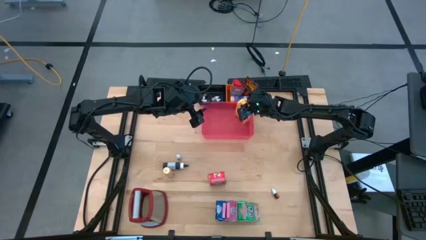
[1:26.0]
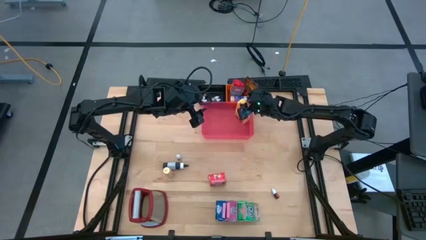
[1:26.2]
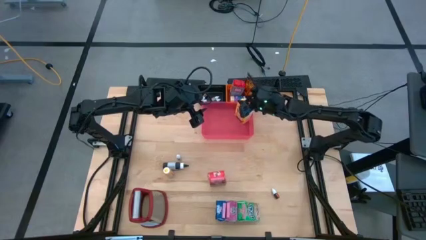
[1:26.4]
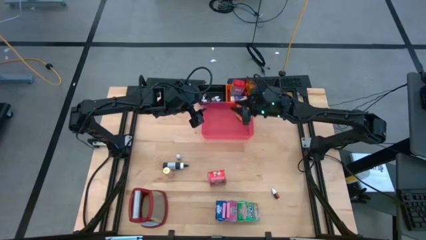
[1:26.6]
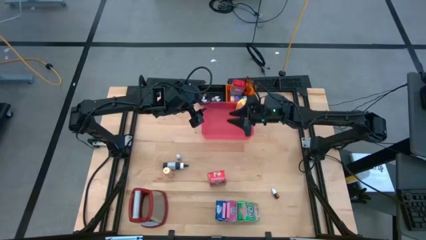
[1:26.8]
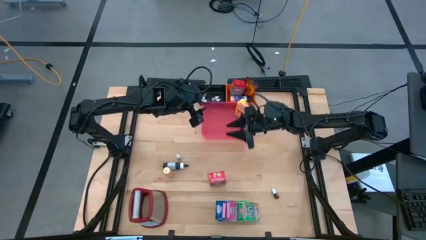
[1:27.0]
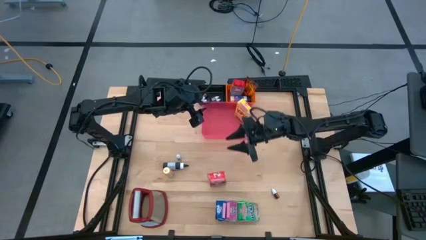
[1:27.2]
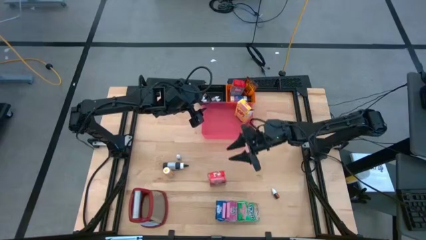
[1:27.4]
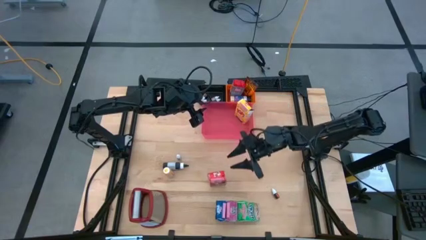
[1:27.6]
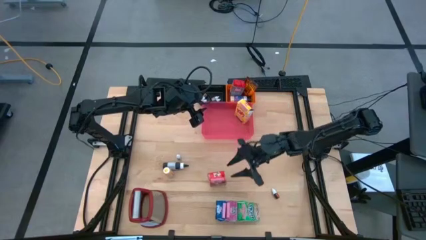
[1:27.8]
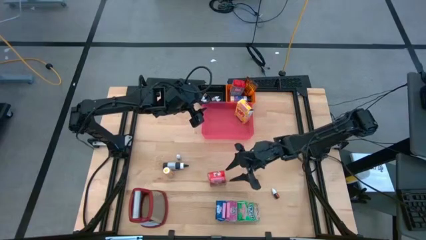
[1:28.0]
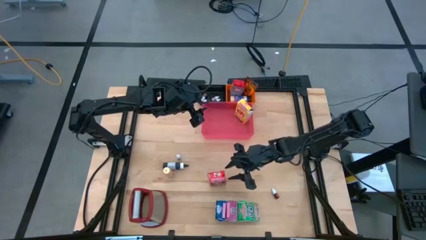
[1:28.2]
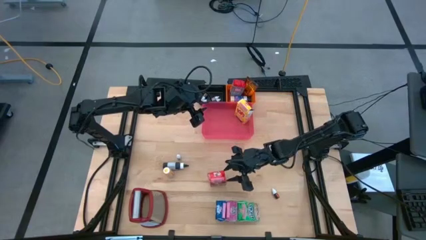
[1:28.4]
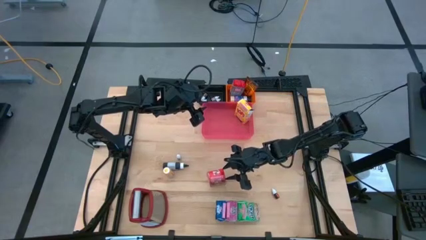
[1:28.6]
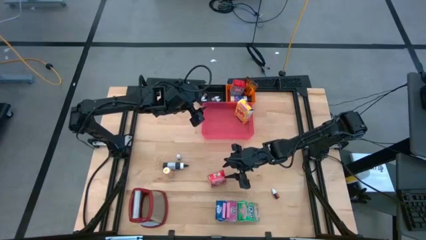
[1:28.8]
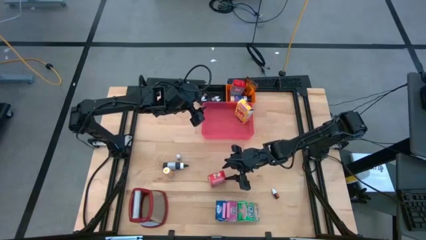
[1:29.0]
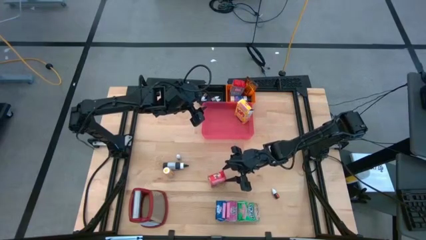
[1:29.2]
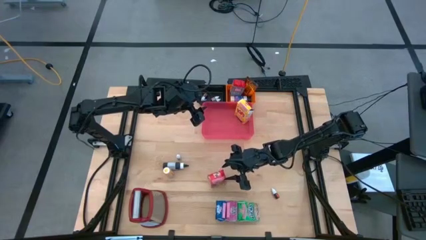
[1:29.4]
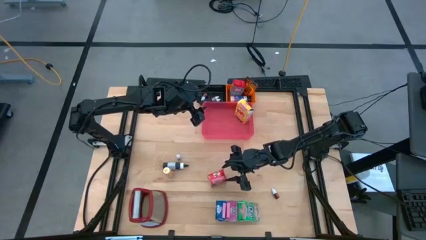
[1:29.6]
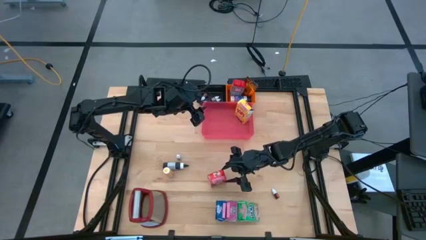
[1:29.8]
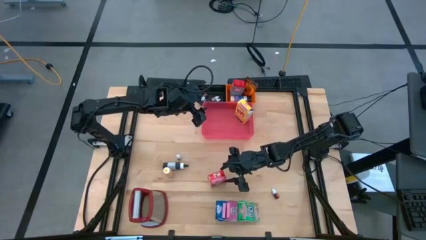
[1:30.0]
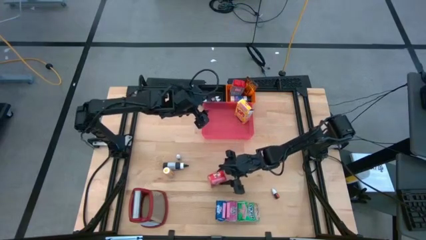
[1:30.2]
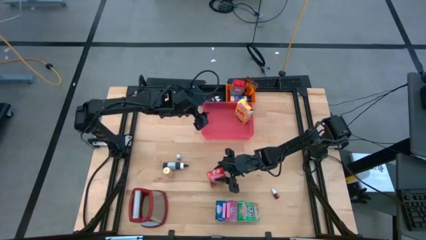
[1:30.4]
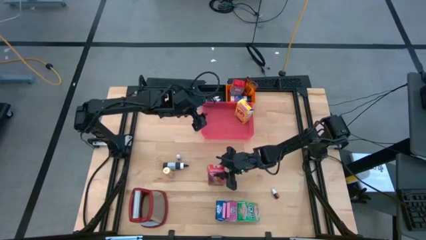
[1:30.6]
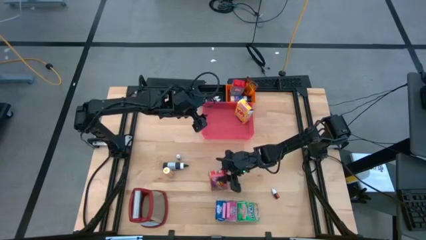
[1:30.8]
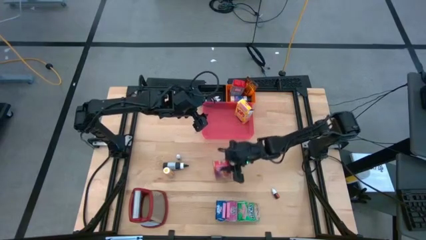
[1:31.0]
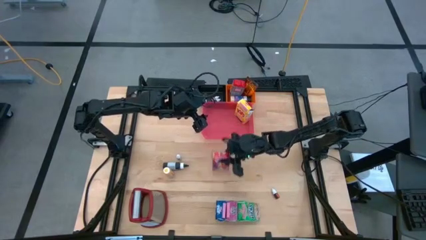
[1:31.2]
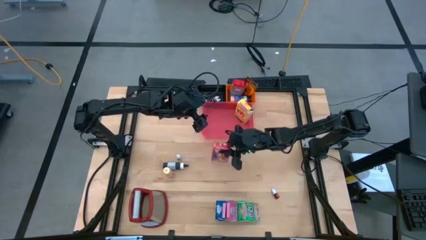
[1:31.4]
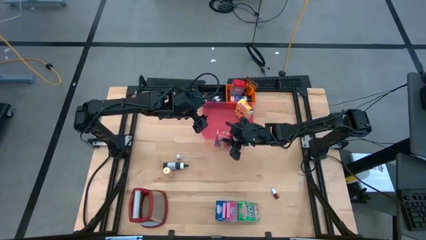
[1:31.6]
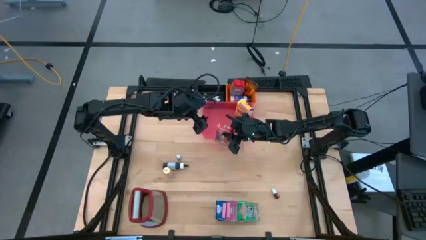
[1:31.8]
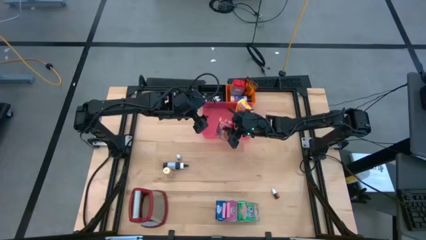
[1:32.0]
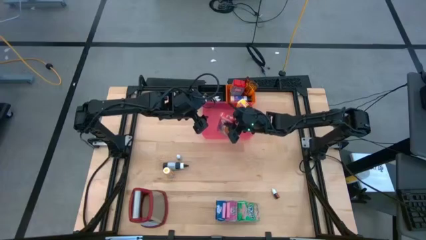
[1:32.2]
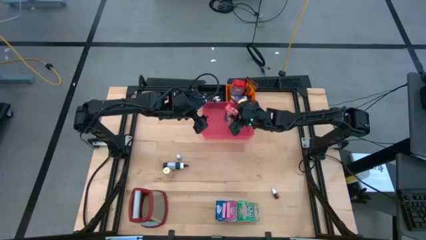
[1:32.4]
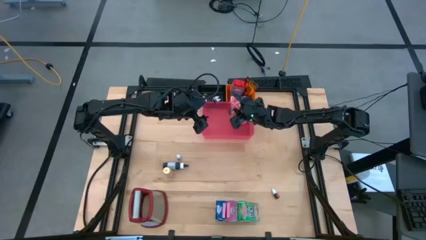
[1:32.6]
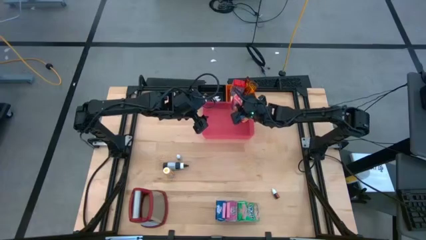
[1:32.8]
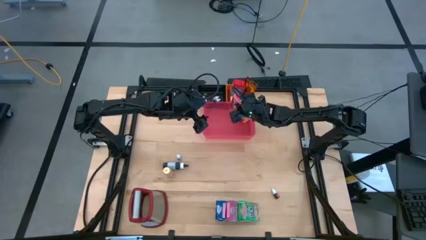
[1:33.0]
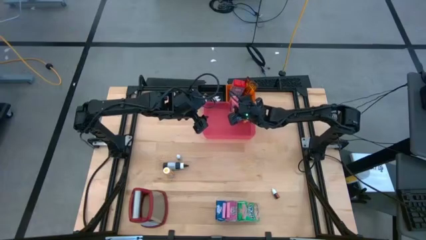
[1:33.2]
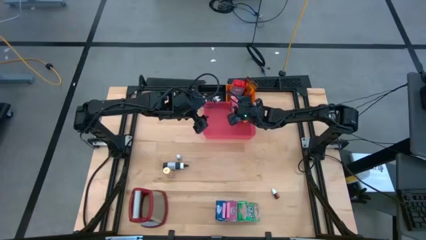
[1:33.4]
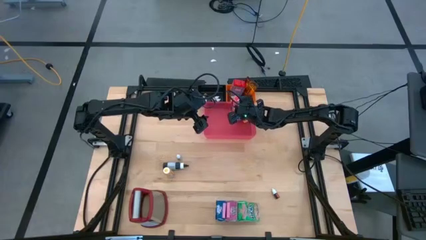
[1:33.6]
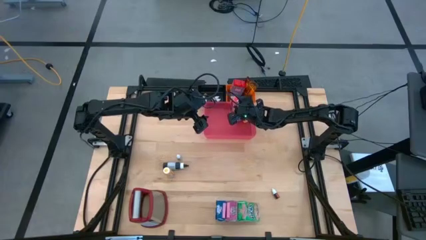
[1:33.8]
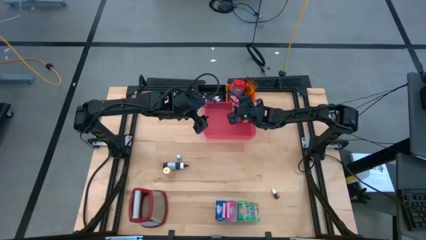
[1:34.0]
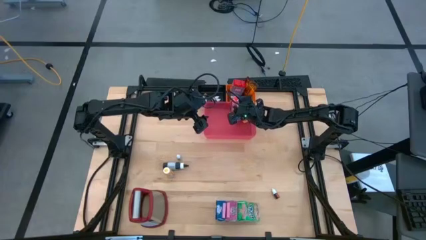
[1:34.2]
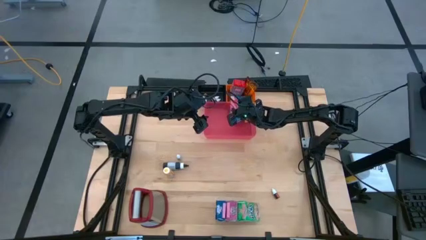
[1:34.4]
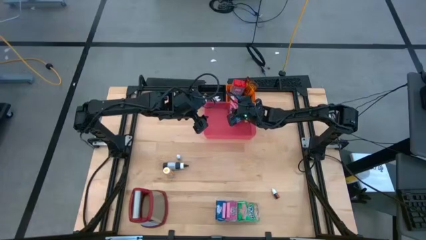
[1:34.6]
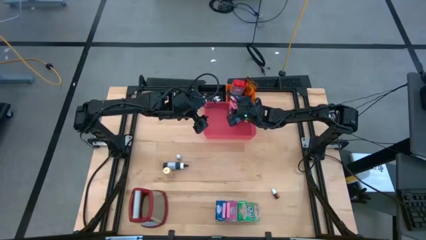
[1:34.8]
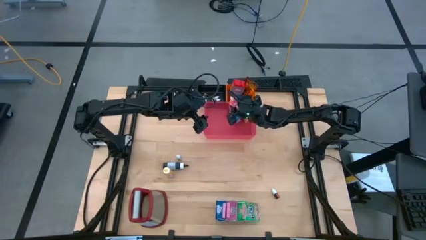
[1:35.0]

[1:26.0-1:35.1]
Task: Pick & Place Kitchen Items
Put the red cereal box into the pink bin

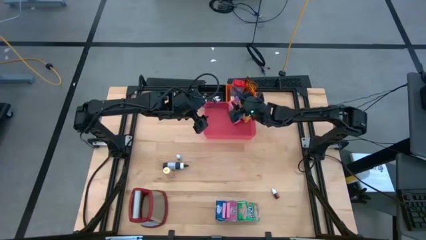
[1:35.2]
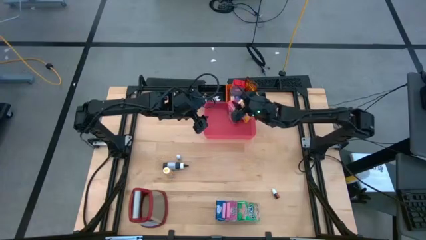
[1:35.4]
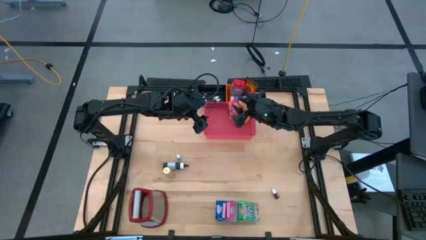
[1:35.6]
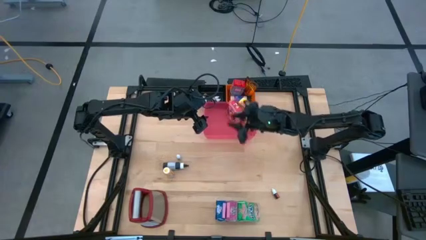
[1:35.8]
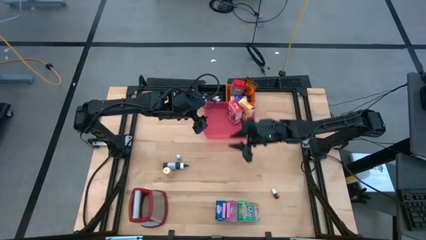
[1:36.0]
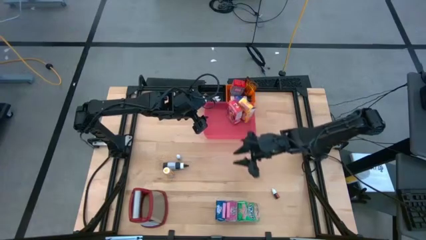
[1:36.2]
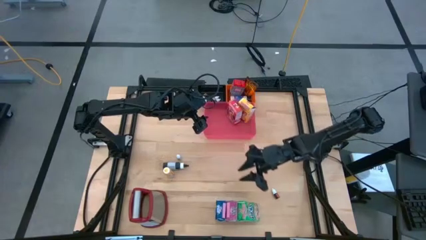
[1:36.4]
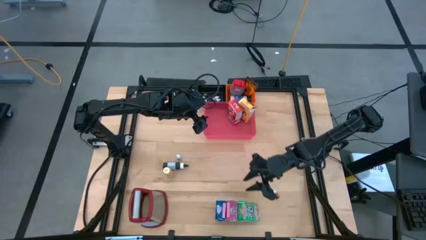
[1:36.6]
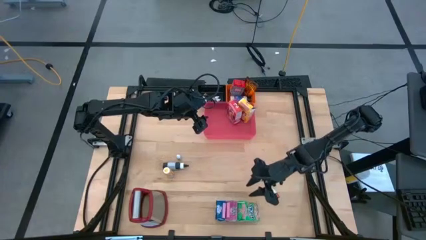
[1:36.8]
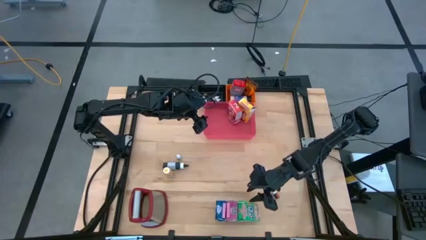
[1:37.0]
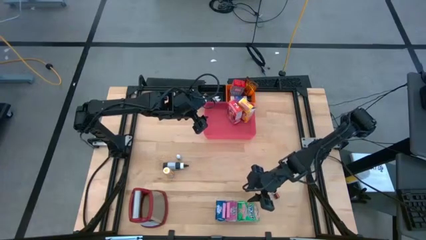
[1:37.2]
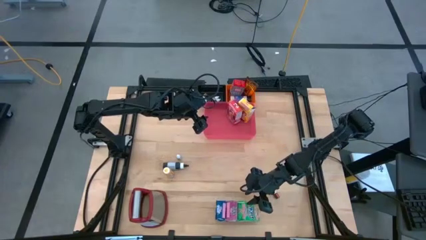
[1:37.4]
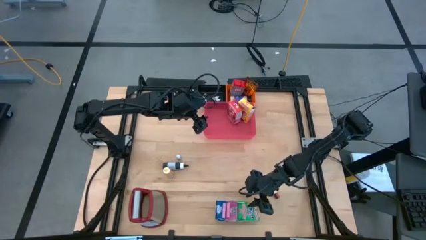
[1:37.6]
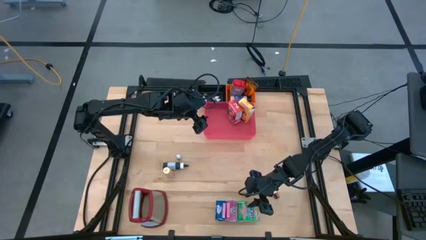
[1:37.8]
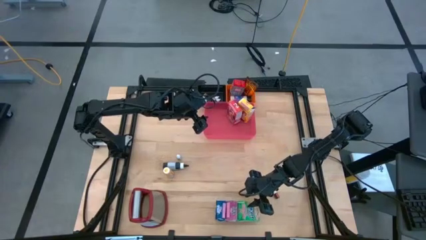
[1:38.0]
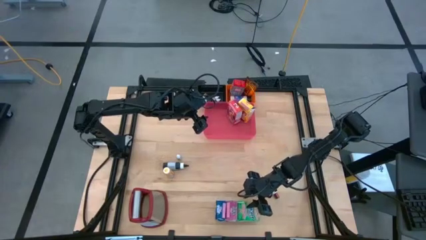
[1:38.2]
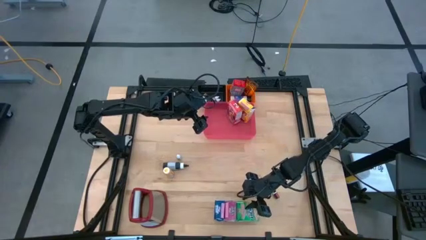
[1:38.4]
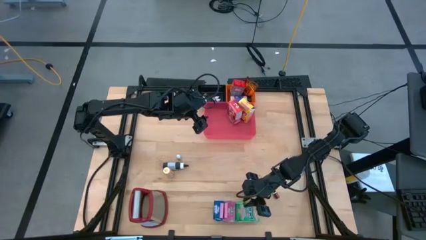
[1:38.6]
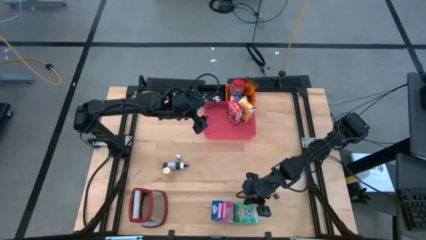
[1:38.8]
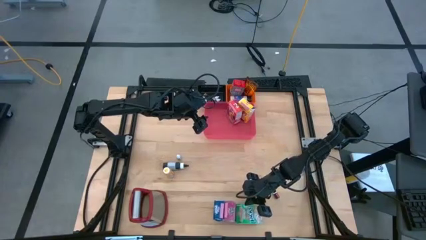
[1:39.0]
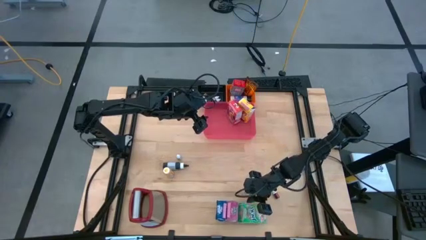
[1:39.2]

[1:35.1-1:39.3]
Put the green cereal box into the pink bin
